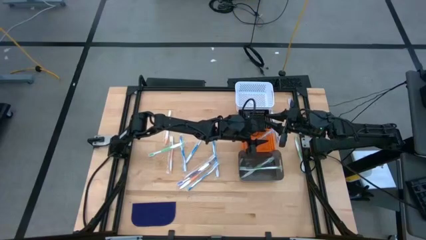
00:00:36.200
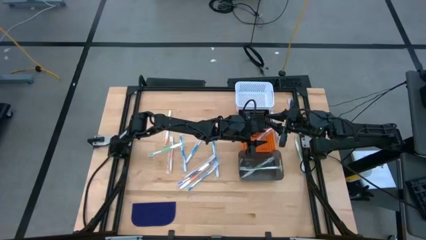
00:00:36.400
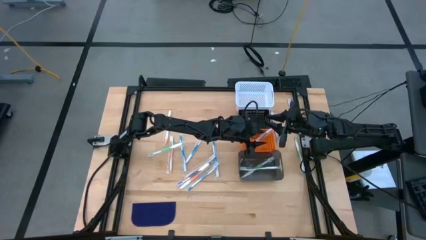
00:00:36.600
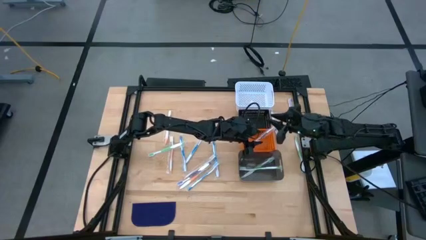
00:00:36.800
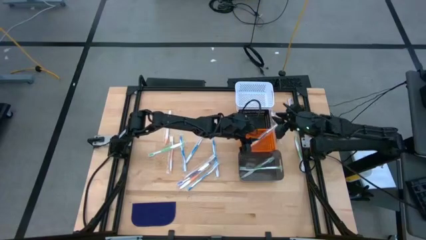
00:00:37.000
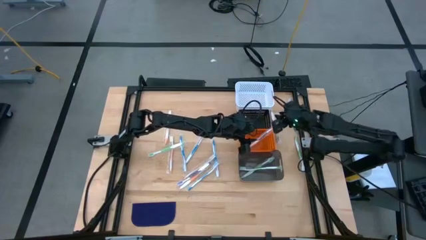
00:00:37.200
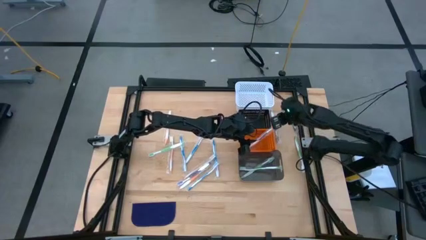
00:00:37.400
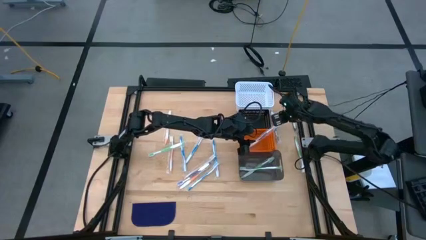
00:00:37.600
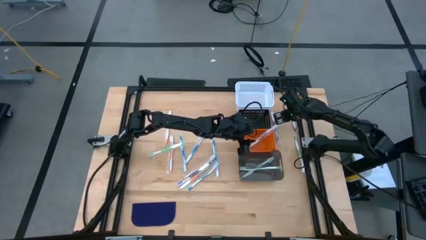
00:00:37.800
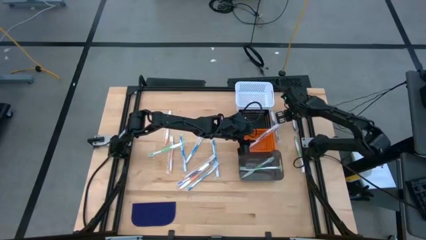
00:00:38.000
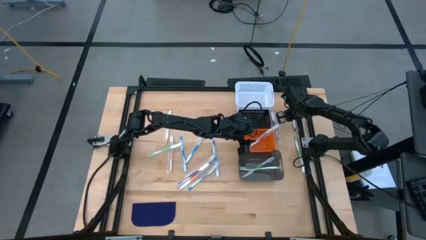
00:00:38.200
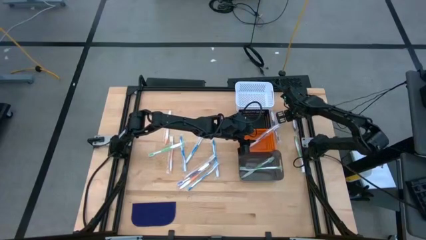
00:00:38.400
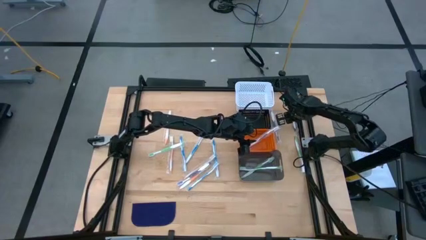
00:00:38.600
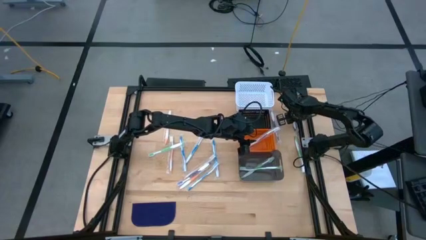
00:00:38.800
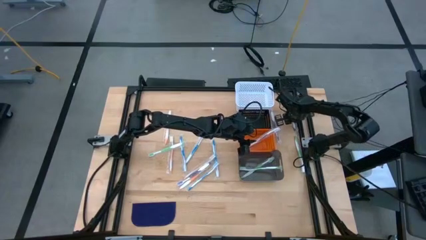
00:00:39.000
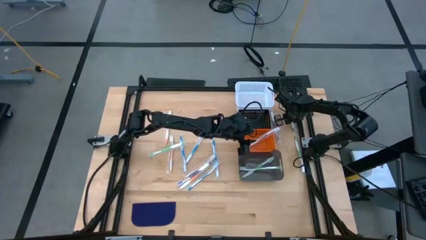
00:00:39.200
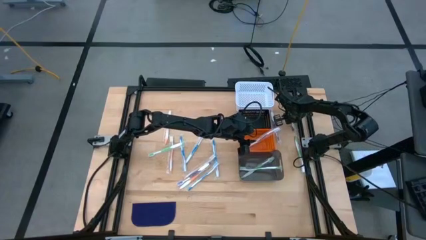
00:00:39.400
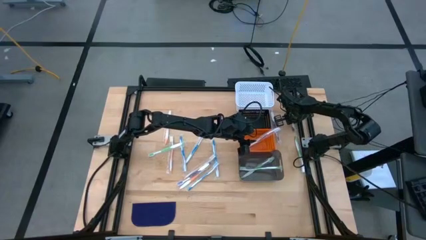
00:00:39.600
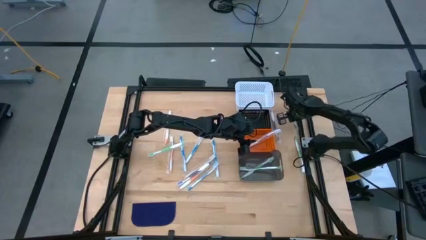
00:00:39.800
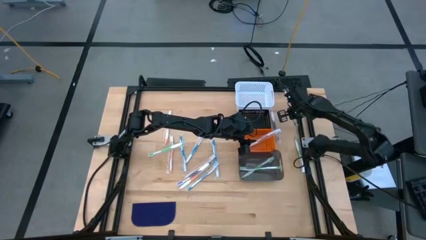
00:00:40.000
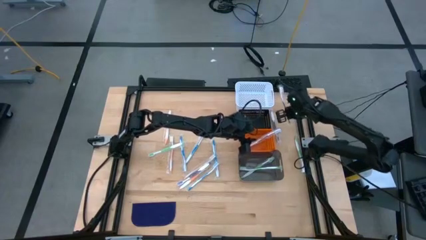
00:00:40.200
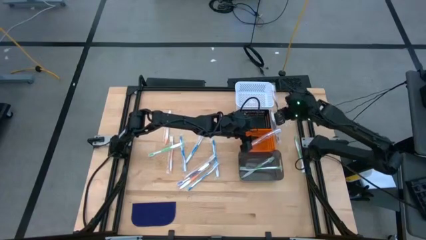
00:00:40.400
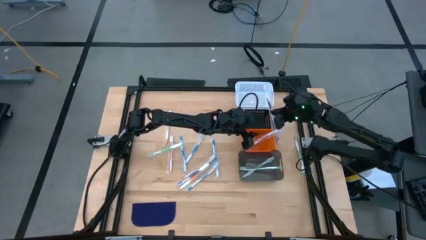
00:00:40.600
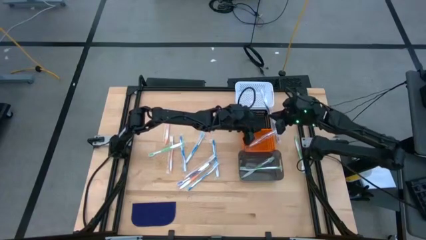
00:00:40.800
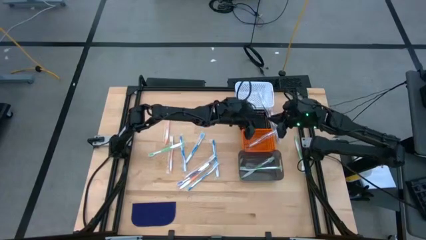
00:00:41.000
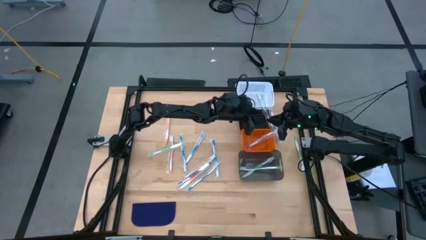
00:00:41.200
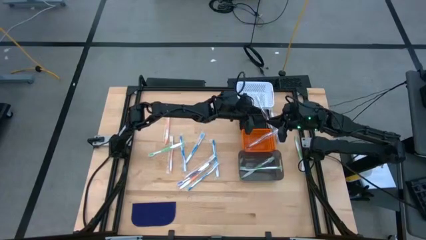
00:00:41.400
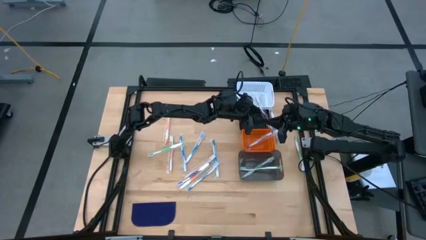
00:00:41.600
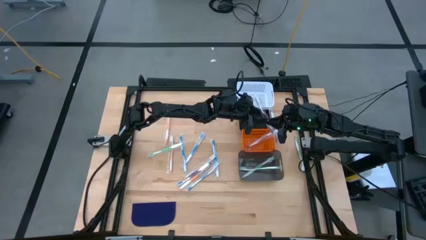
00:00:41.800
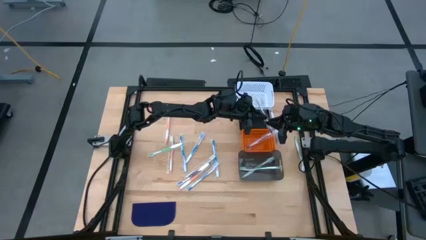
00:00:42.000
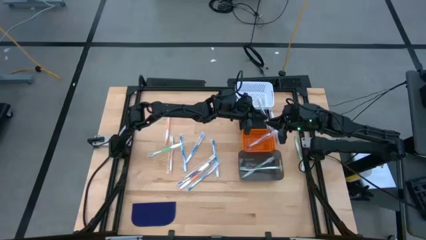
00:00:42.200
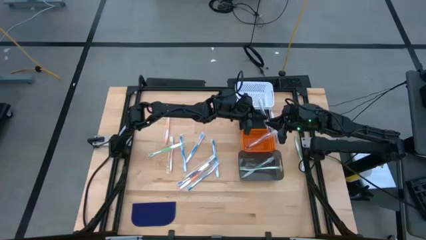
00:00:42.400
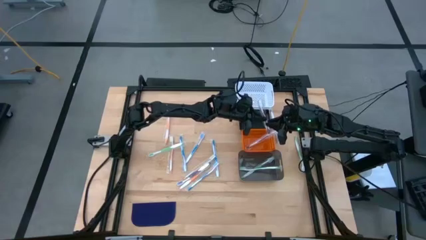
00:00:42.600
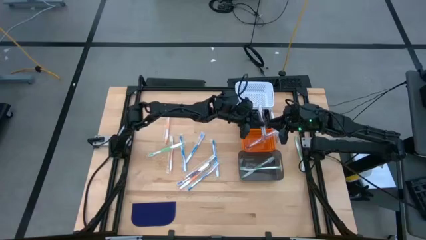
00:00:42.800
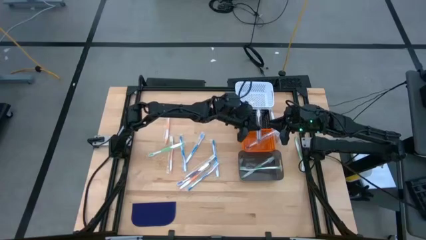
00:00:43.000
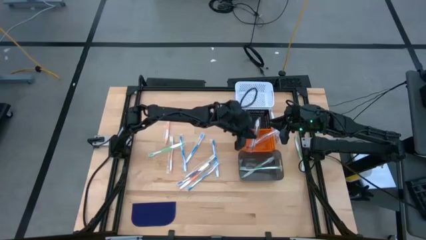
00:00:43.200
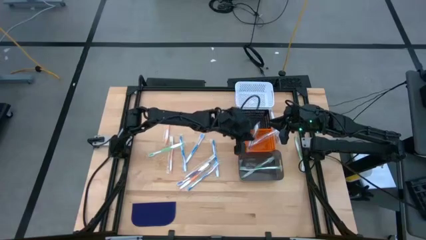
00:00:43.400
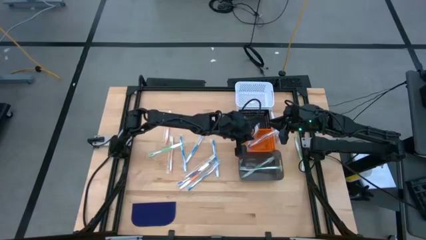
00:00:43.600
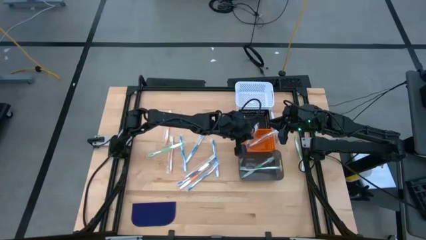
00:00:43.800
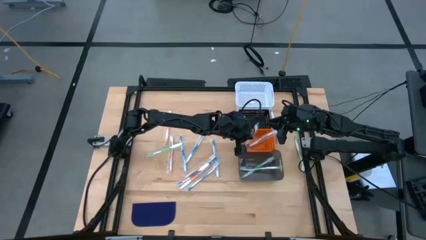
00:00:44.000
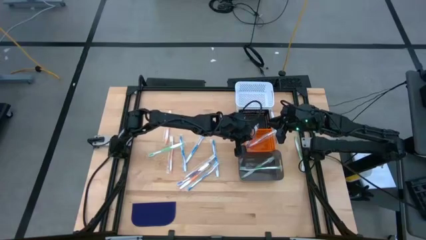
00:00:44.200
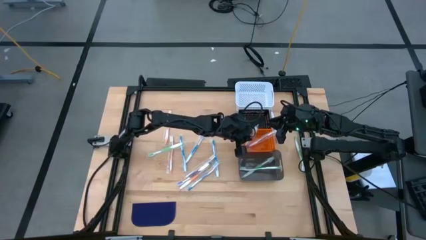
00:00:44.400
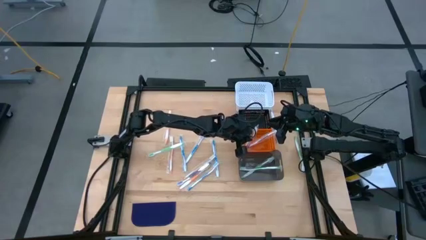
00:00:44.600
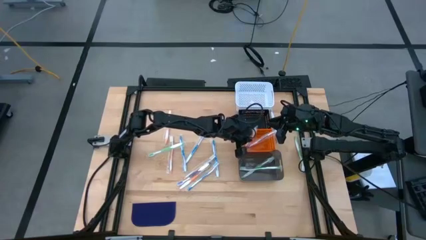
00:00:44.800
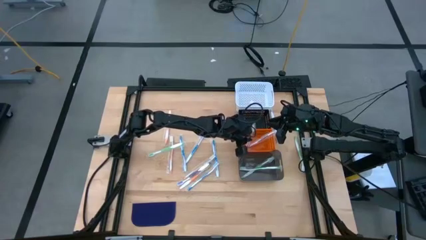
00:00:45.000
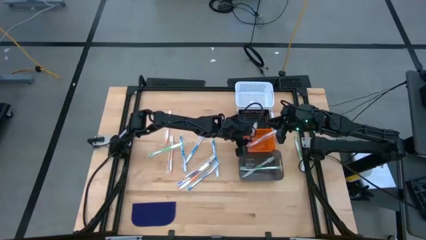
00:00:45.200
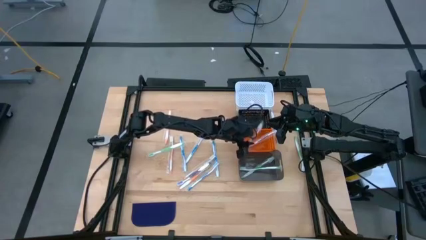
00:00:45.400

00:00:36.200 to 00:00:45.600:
Task: Pick & Place Toothbrushes
Put the purple toothbrush into the orange bin

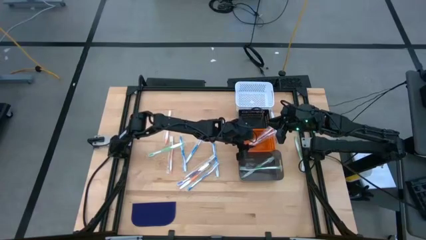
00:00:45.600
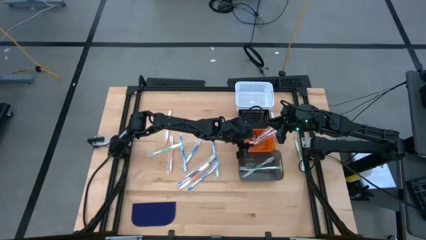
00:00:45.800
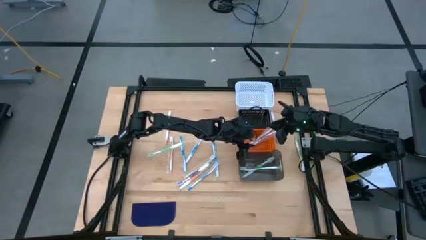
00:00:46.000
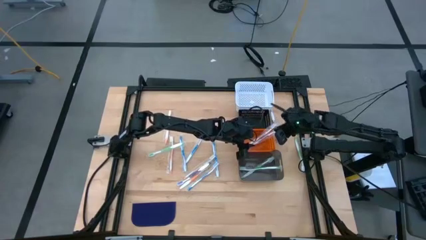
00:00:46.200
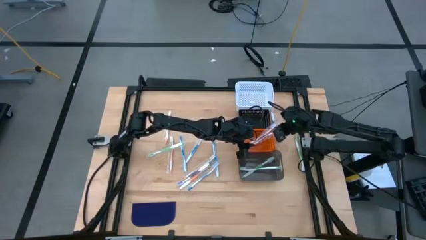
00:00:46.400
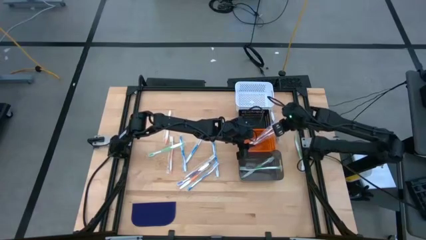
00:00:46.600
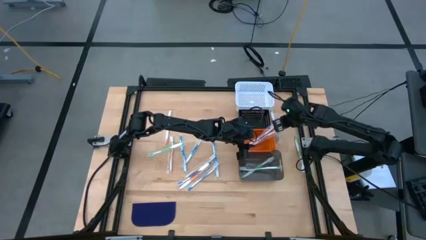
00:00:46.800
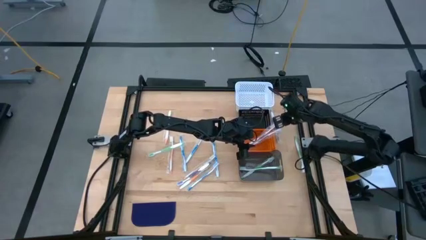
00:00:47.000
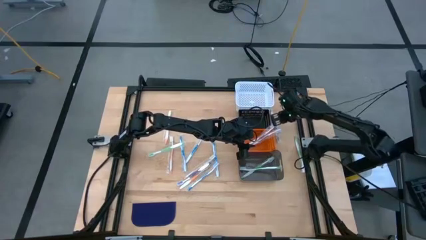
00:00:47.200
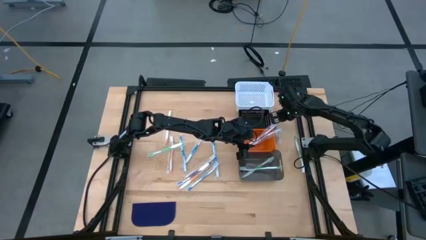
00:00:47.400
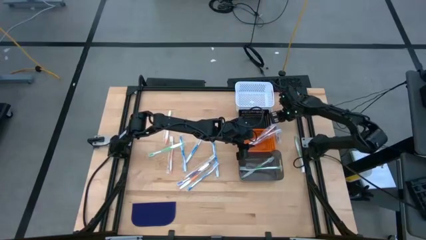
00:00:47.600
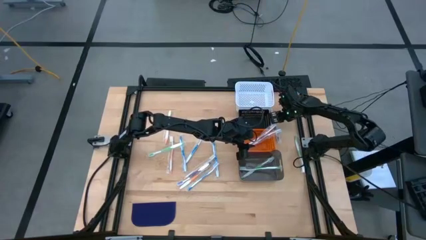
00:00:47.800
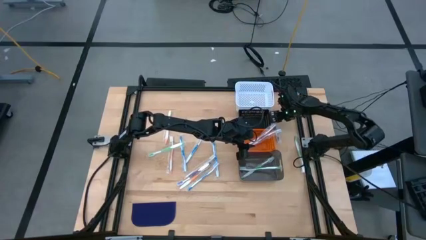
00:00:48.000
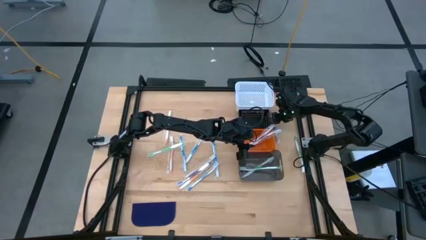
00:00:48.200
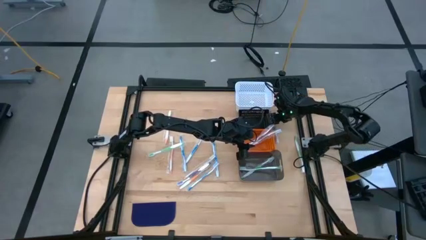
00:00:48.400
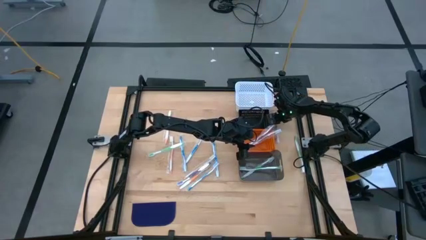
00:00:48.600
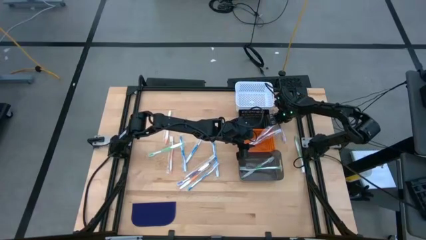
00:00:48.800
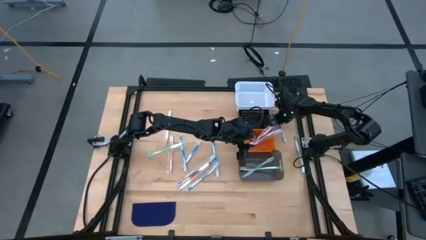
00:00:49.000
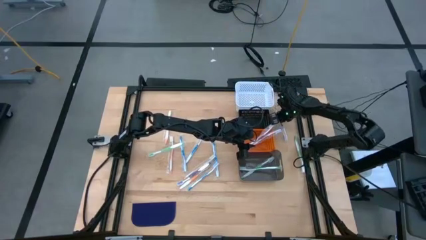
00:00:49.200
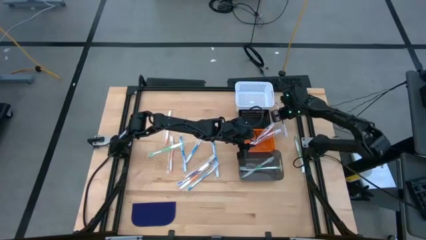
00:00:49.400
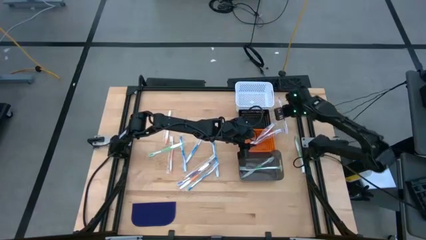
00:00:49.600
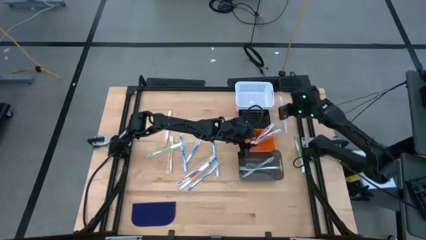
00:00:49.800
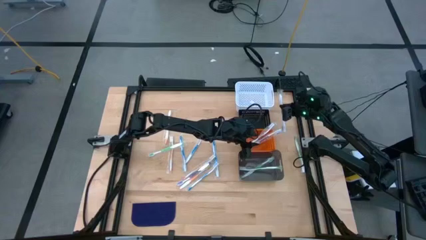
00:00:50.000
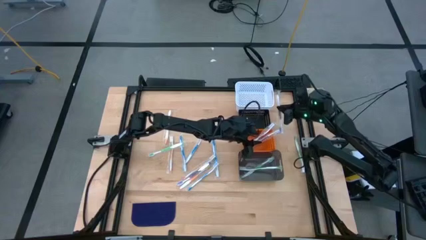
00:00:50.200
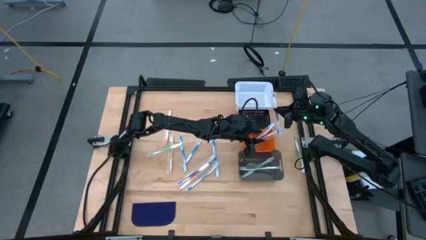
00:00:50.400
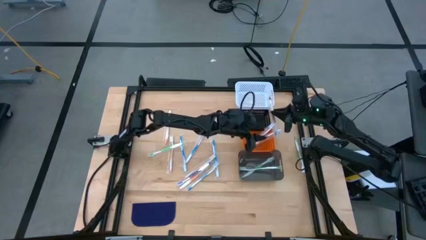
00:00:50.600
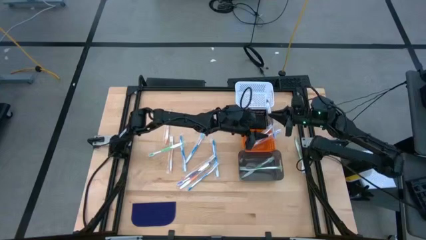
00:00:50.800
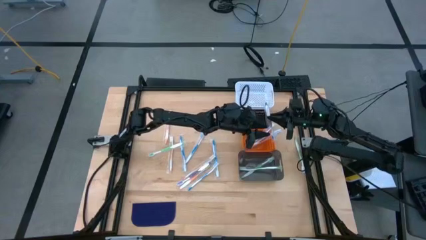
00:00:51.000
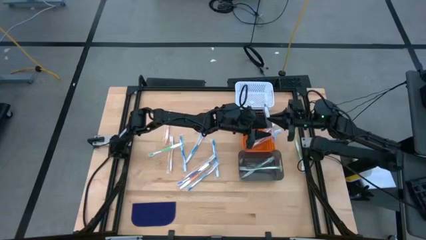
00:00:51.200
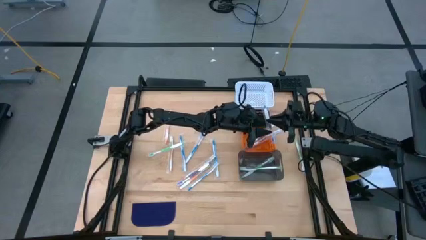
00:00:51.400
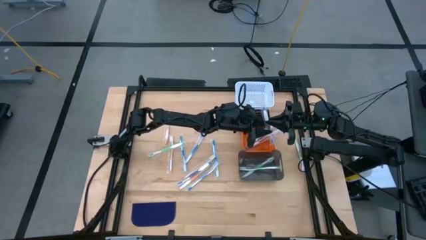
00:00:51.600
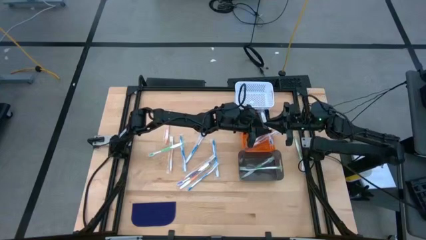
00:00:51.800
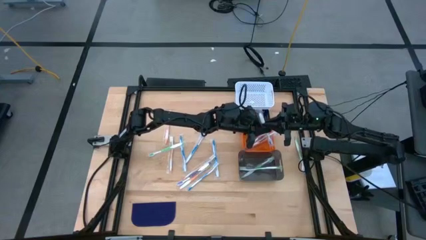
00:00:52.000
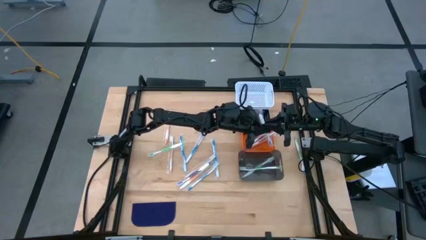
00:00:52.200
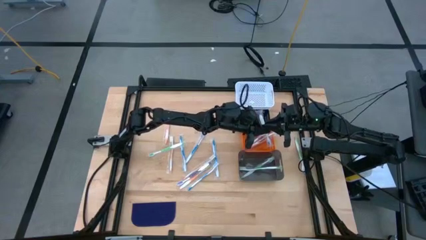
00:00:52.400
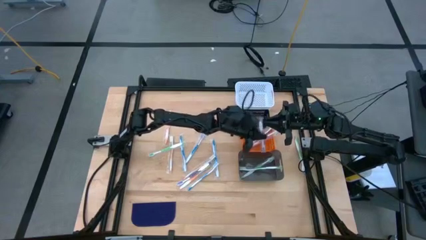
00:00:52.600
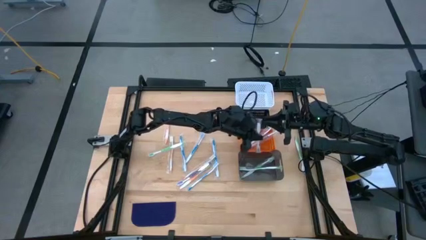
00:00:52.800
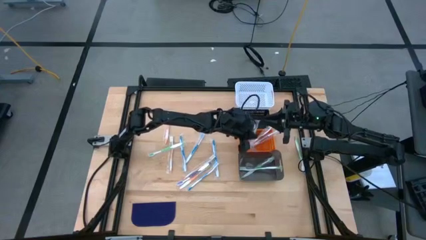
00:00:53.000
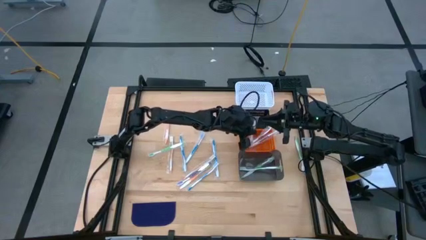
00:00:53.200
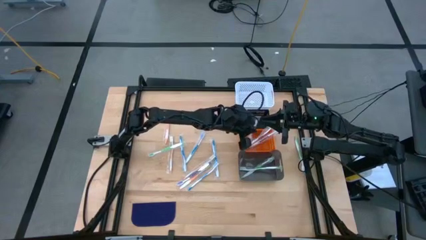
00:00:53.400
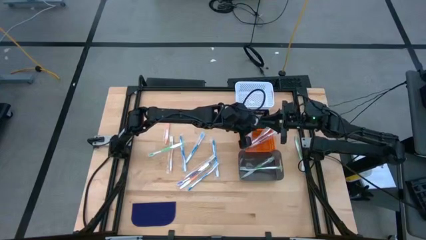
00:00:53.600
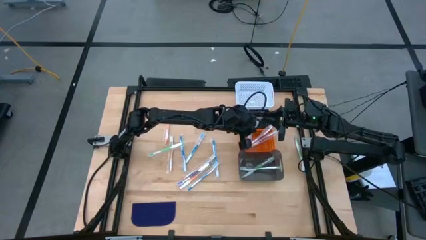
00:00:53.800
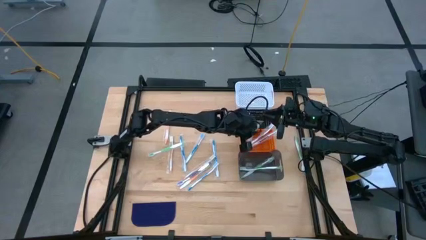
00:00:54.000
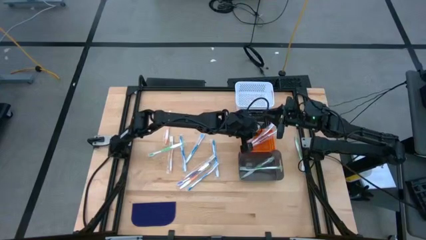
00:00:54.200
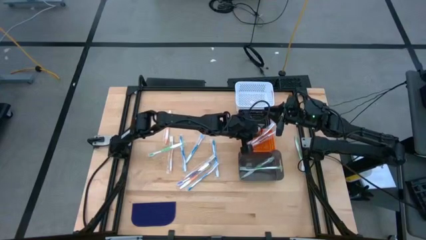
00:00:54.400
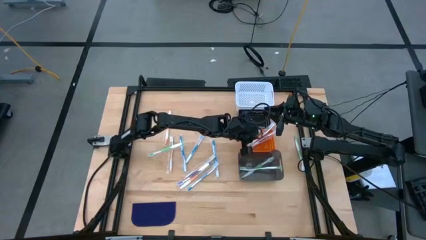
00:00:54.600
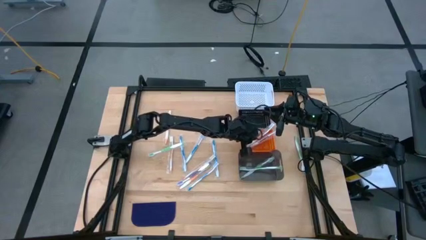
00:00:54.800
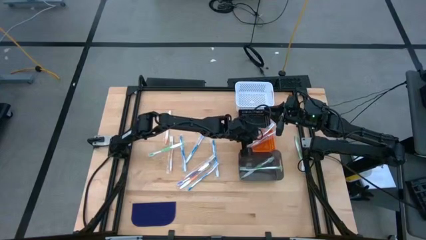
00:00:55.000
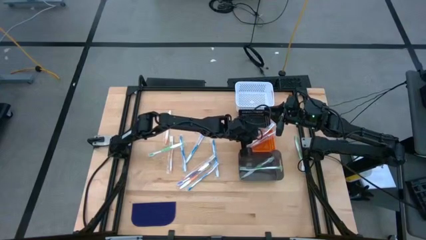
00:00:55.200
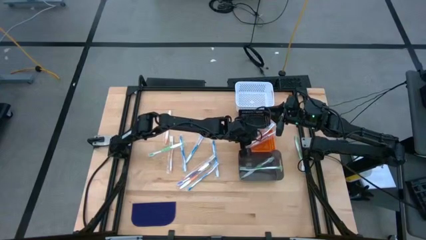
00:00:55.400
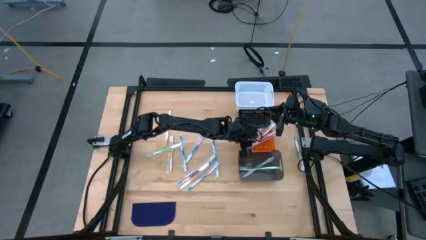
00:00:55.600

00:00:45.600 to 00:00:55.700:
Put the purple toothbrush into the orange bin
